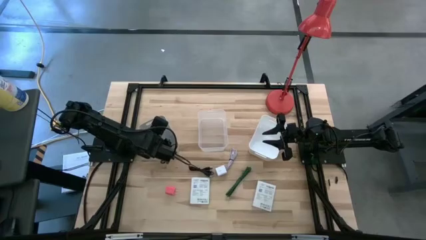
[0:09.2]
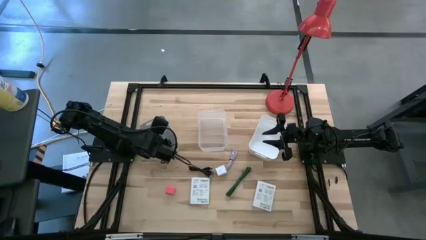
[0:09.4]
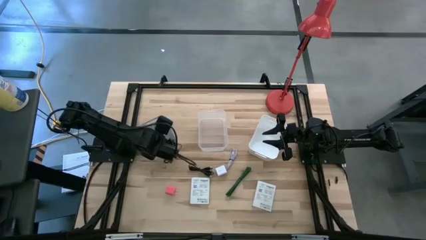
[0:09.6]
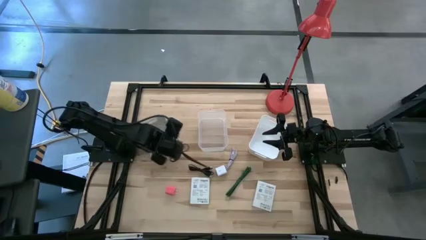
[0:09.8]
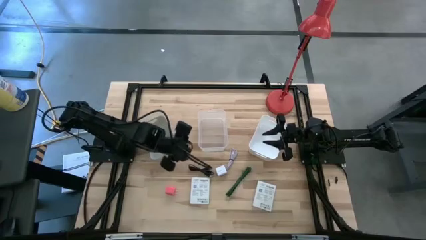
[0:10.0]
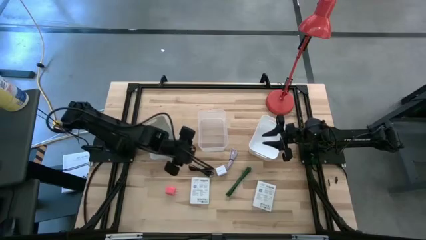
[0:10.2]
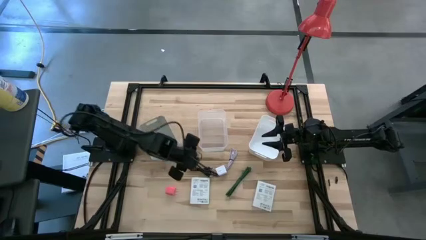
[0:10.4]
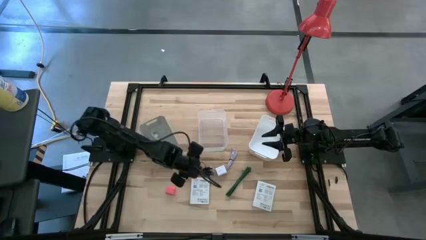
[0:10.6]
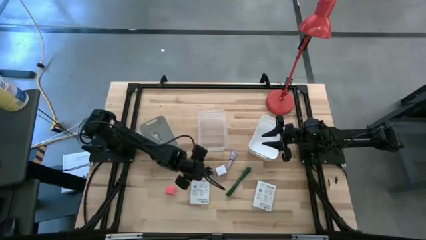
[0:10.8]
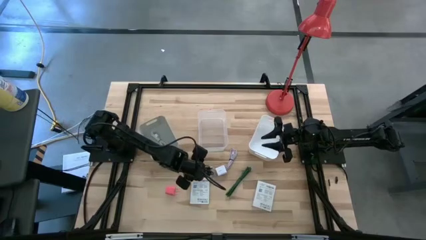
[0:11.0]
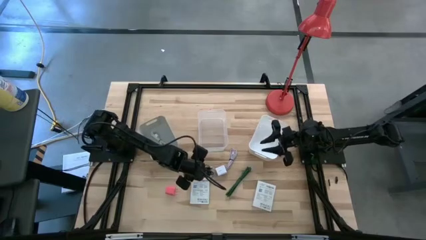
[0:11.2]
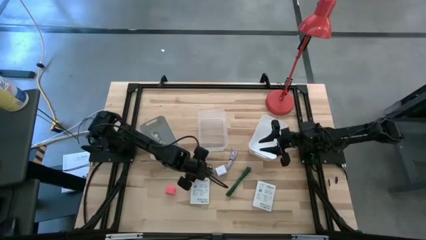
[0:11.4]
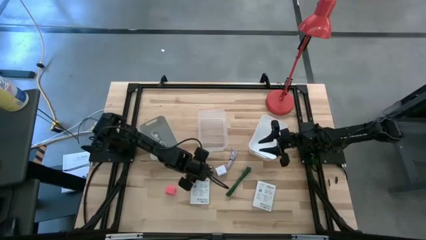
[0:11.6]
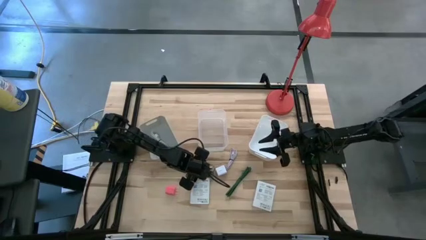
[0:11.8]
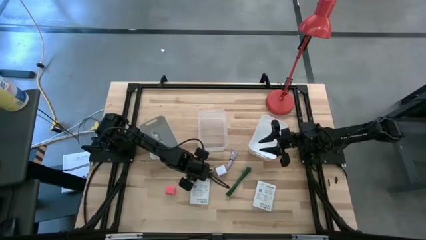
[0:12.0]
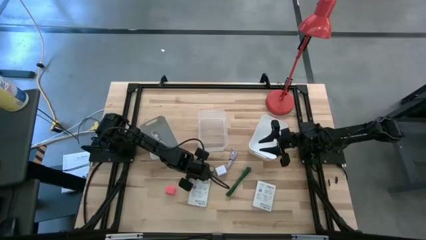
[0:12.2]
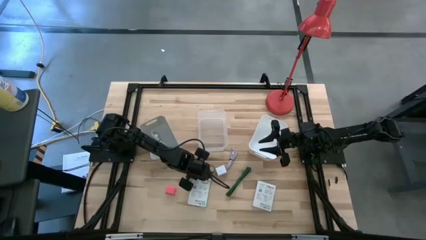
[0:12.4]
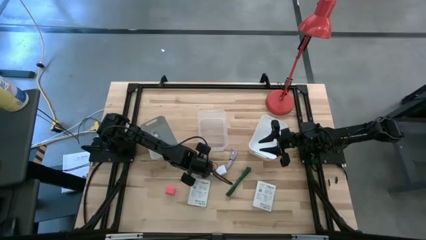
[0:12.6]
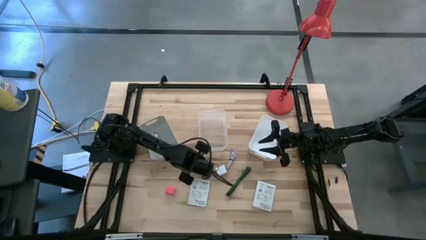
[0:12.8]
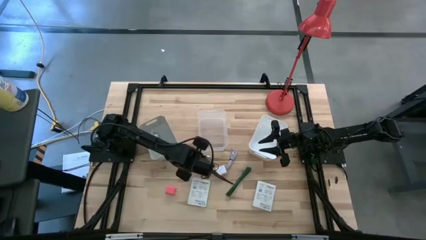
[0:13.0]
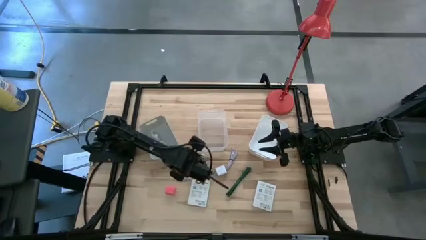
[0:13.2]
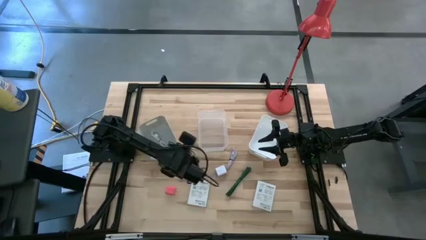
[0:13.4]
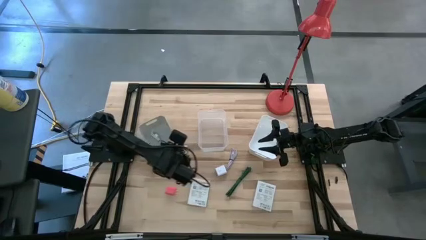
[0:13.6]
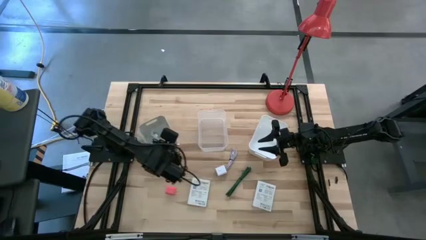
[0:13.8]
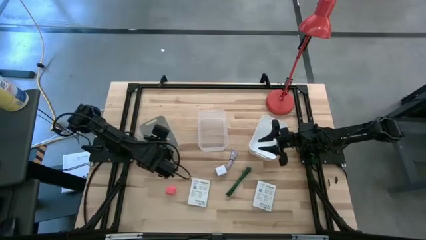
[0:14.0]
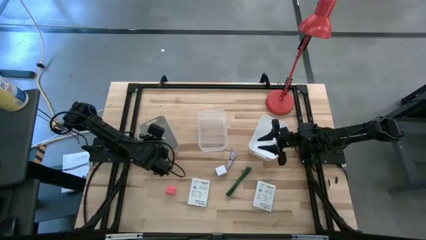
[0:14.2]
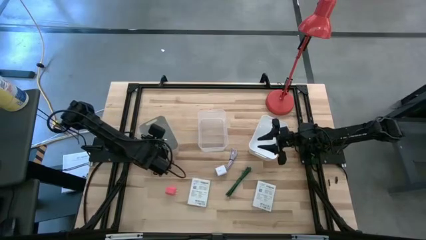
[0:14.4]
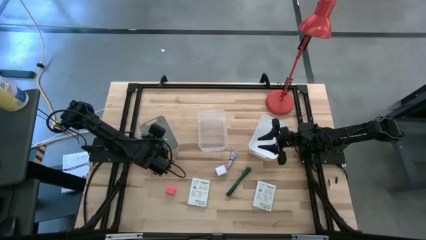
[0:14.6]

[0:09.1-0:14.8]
Task: Pick and place items into bin
Put the black charger cable into the gray bin

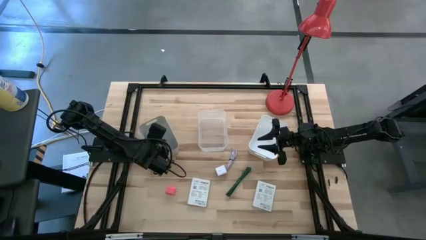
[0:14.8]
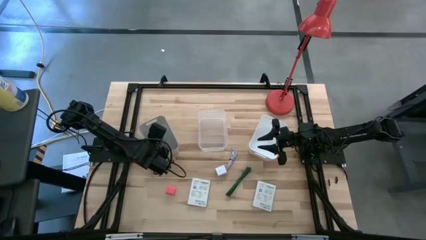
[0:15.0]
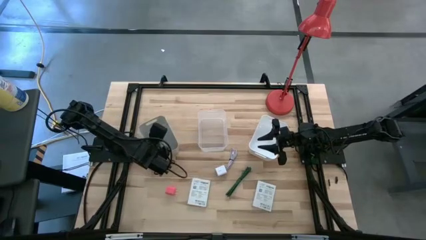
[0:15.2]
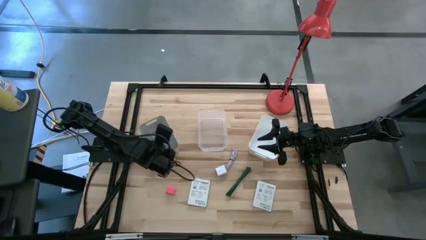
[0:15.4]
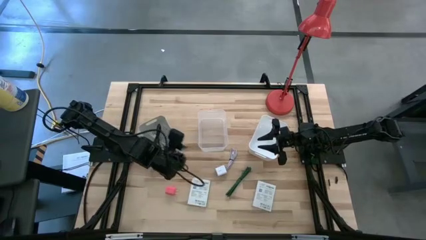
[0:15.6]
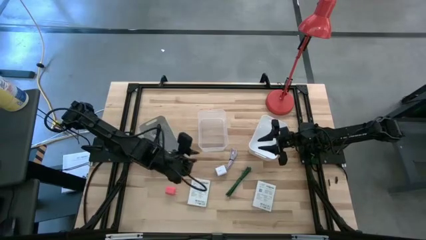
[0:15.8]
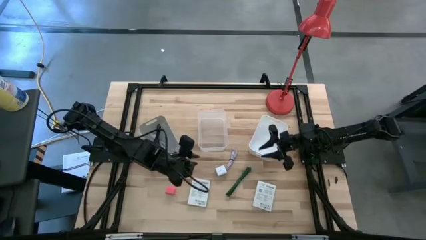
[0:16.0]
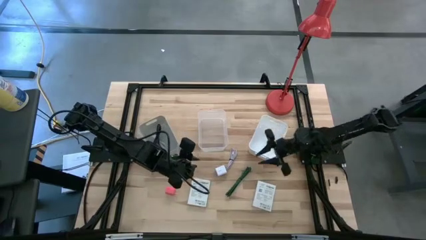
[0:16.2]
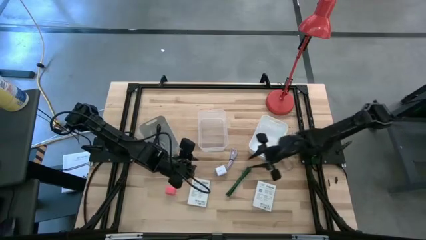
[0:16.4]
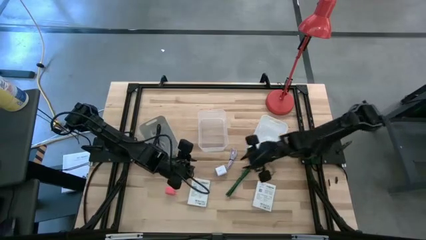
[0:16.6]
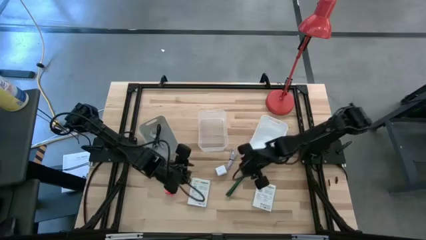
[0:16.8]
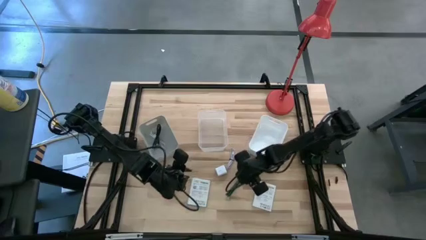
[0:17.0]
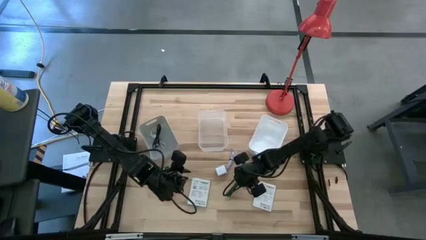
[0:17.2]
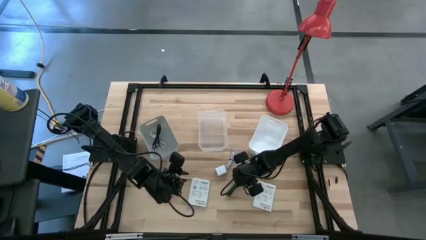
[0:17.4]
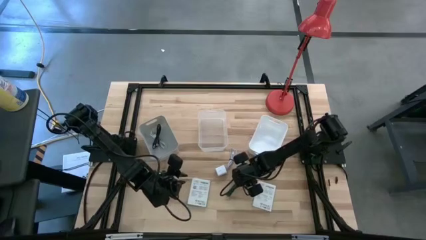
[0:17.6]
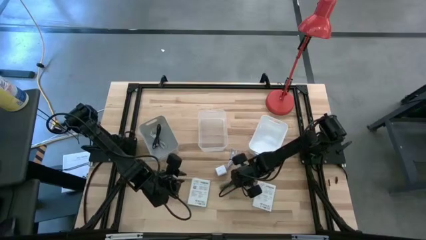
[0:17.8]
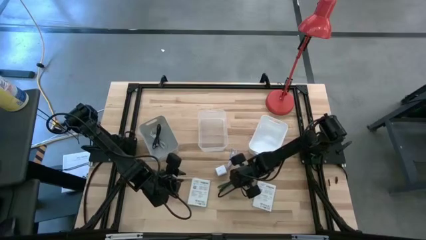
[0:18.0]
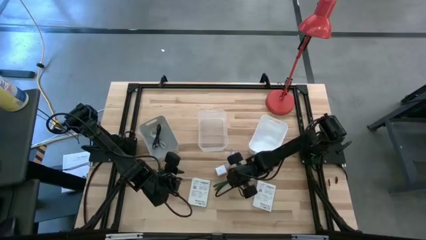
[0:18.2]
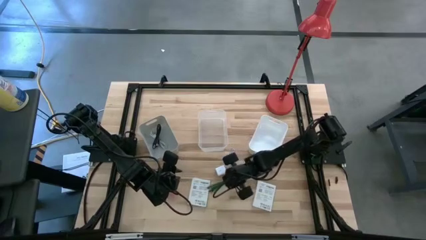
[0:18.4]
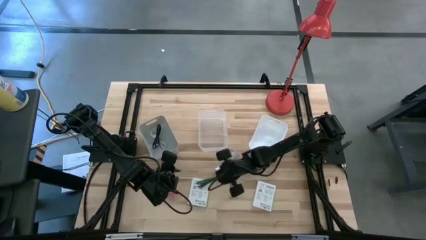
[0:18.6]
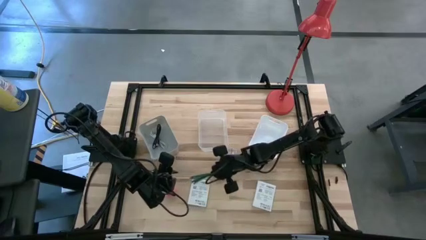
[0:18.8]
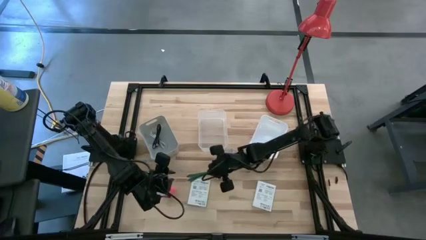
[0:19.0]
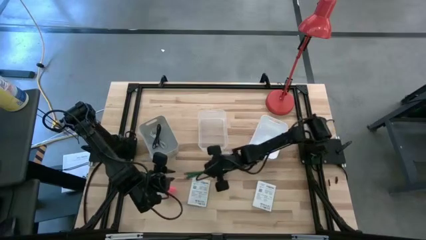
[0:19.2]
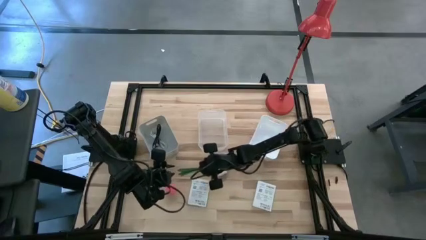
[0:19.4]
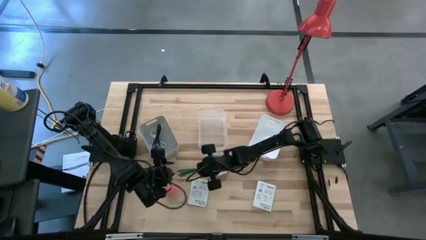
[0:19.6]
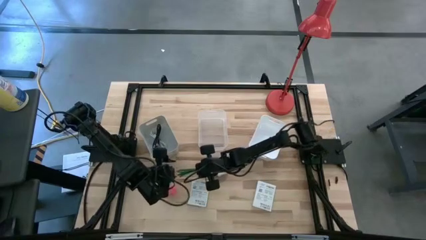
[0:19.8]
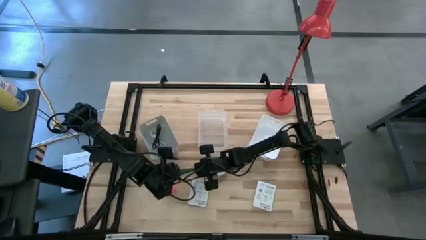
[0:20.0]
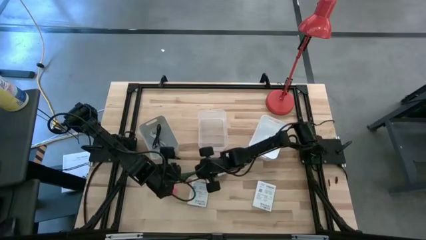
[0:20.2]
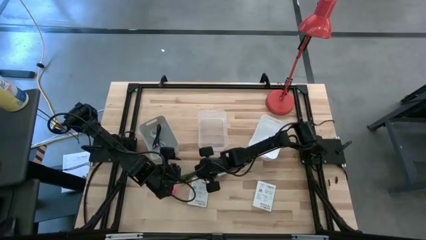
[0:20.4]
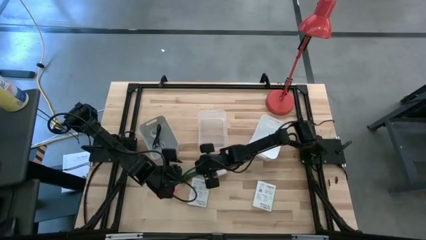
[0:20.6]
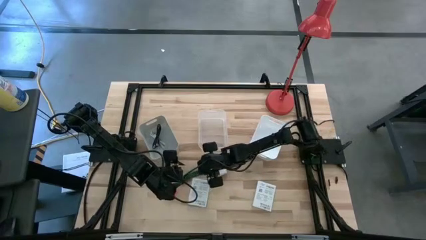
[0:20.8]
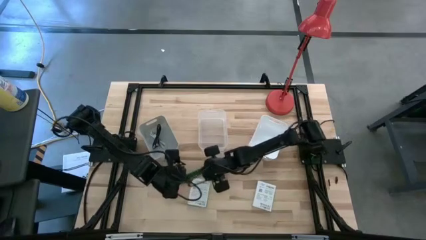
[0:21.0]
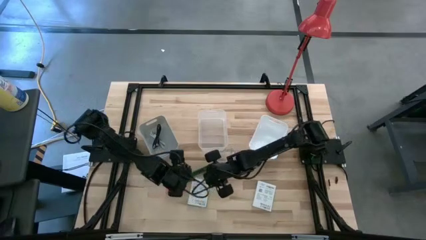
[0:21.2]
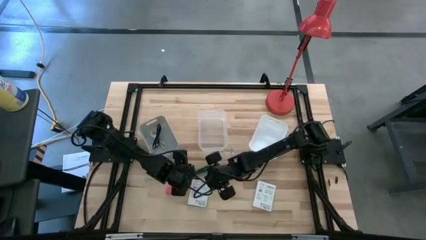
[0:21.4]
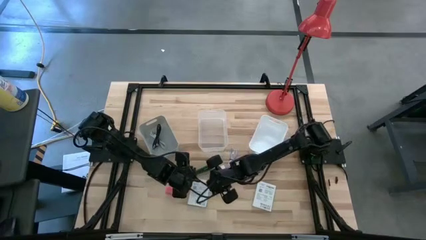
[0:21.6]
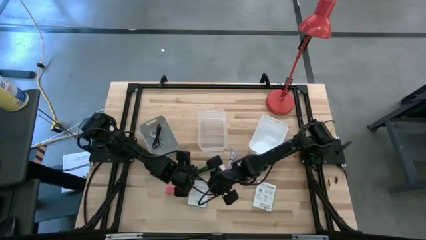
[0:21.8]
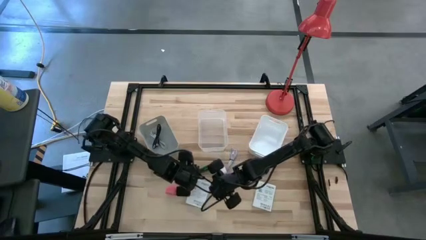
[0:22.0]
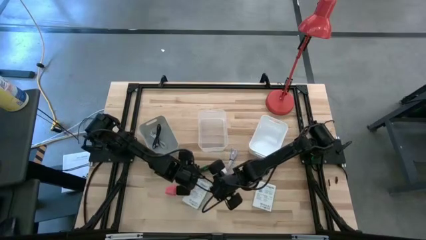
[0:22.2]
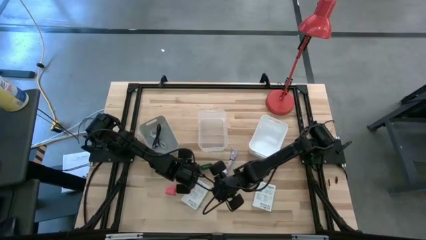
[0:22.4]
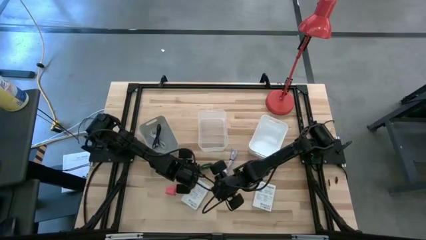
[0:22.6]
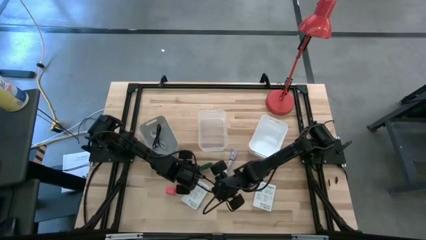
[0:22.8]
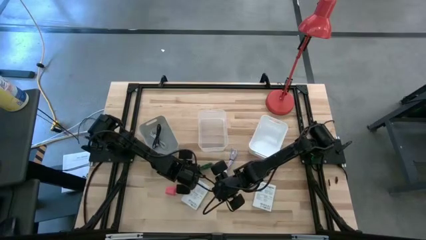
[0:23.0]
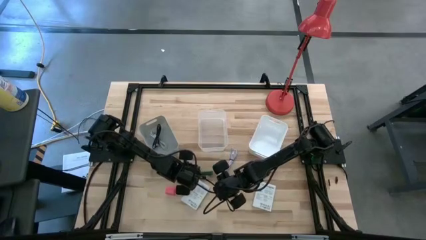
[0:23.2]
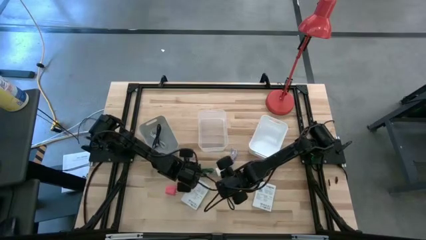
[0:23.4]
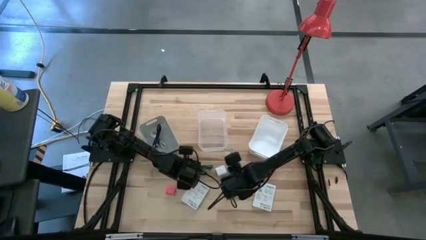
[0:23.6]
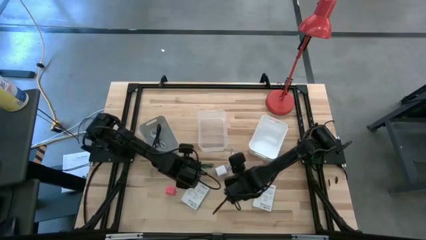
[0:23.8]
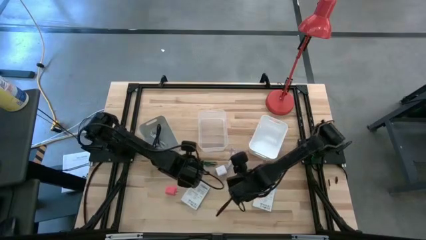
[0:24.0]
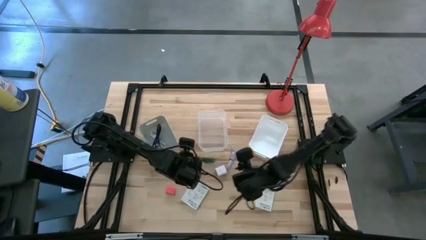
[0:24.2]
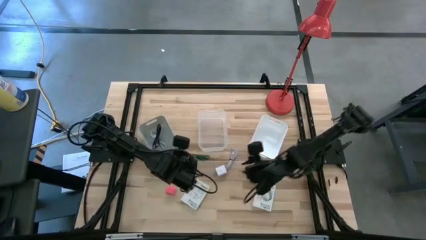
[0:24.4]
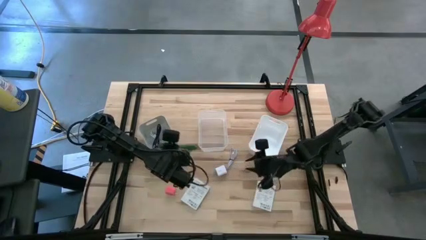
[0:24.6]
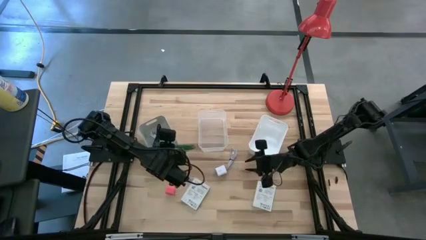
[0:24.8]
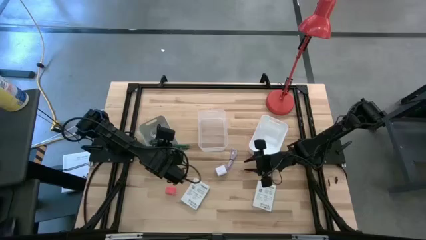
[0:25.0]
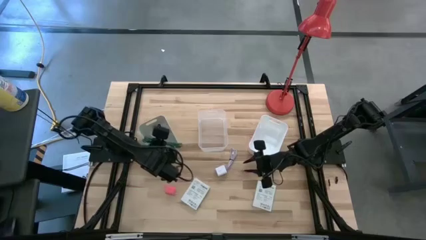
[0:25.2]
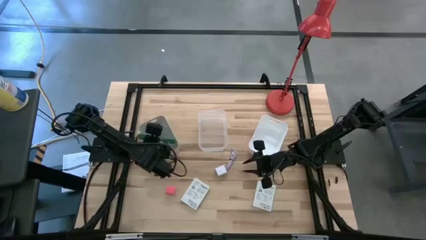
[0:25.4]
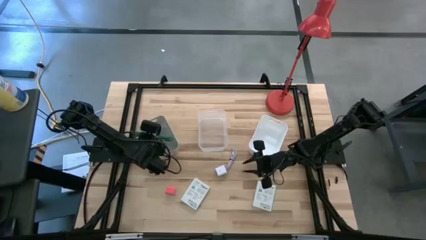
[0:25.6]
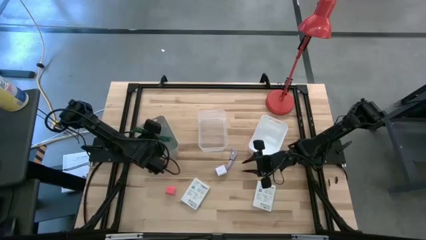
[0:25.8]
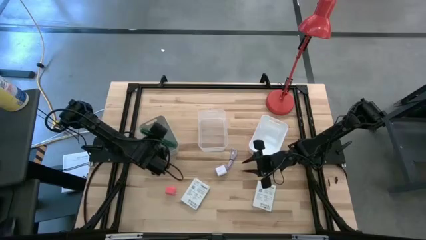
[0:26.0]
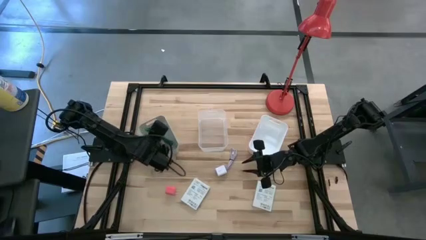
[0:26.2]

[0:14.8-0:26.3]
Put the green charger cable into the gray bin

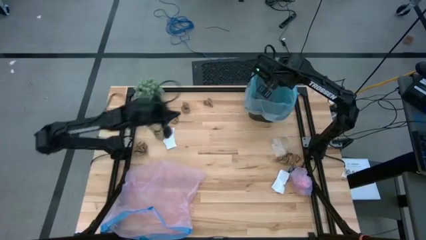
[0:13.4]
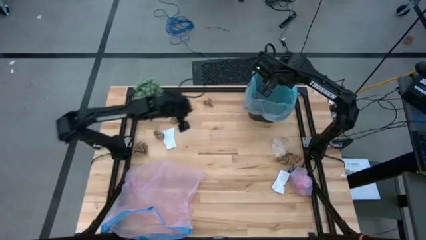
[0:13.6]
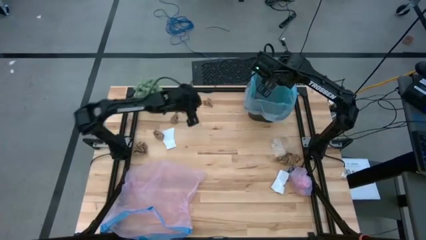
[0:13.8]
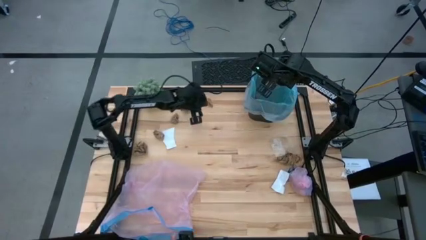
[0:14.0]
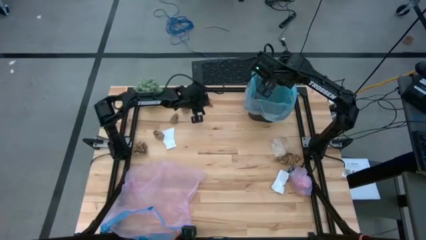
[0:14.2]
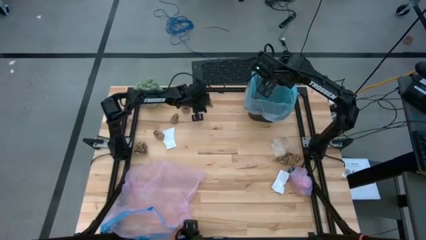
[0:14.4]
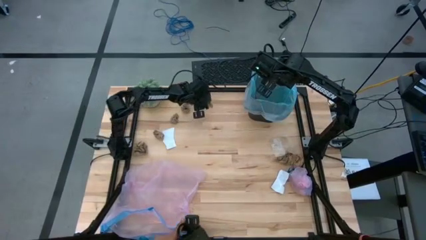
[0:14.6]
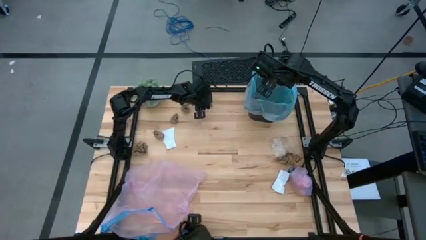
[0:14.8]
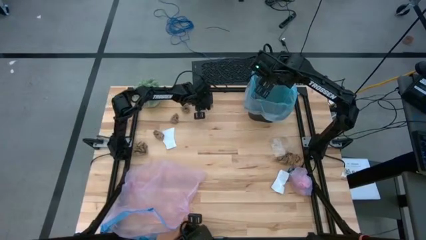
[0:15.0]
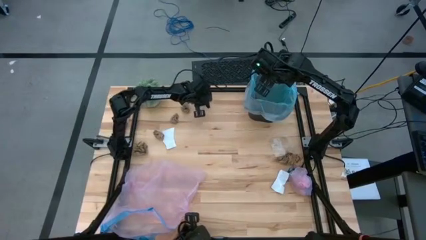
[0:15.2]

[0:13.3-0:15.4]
Task: place trash/remove bag and relplace
Put the brown napkin into the trash bin
